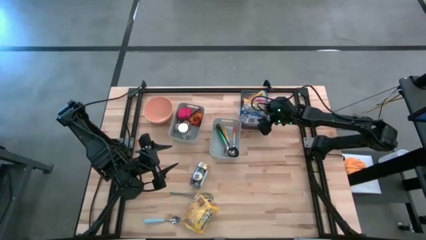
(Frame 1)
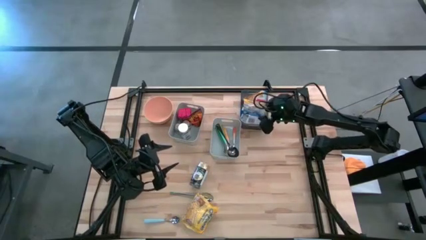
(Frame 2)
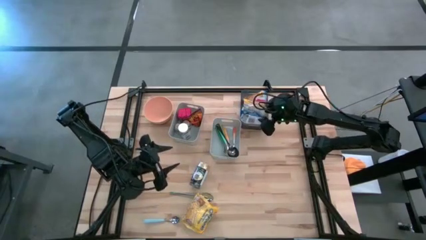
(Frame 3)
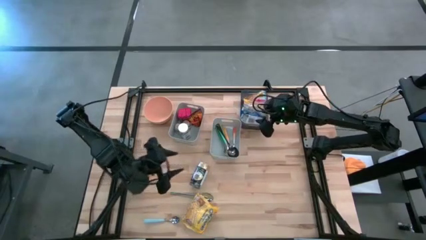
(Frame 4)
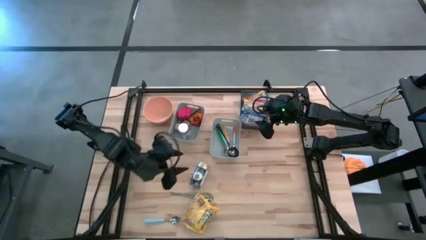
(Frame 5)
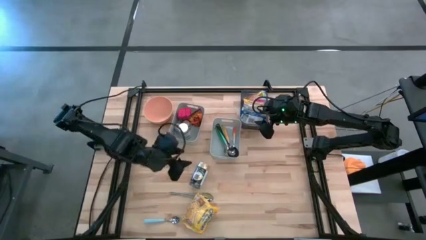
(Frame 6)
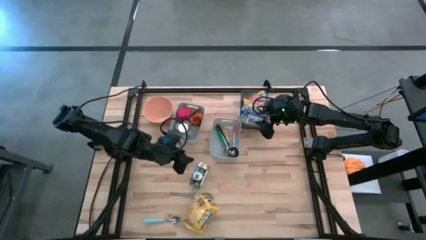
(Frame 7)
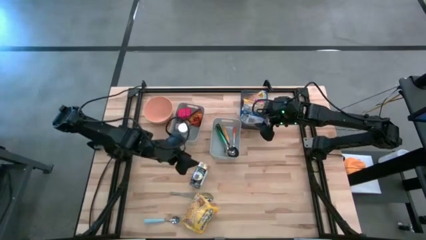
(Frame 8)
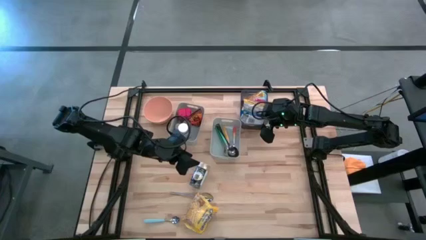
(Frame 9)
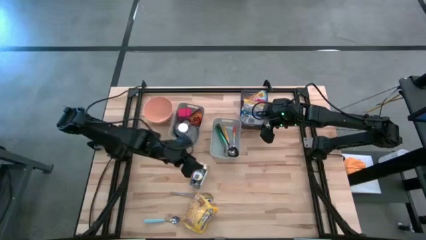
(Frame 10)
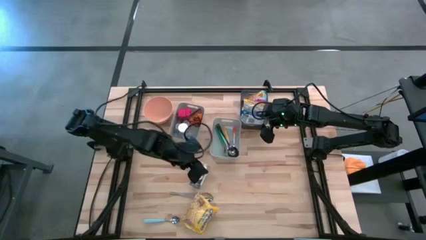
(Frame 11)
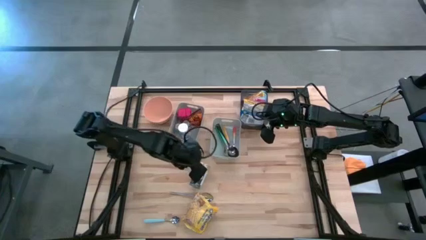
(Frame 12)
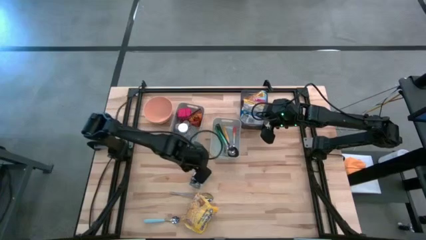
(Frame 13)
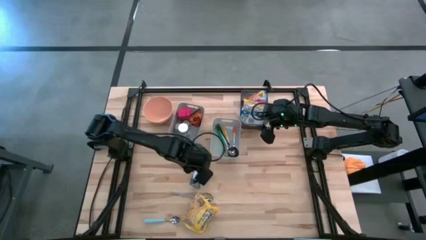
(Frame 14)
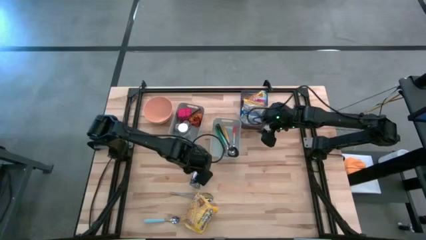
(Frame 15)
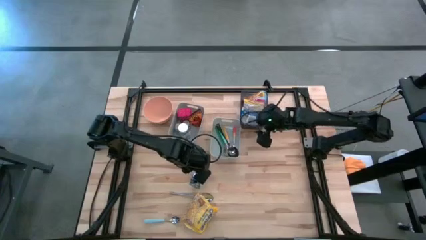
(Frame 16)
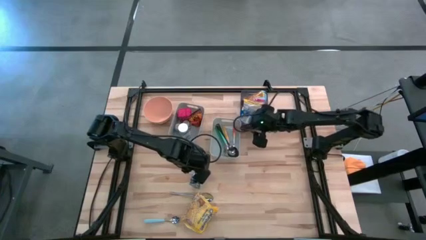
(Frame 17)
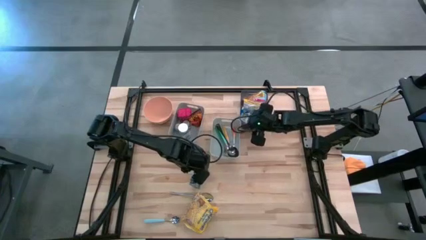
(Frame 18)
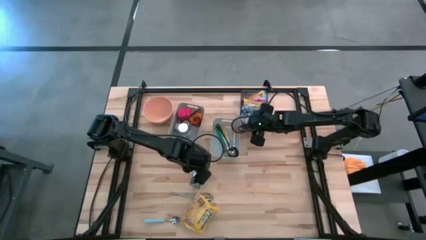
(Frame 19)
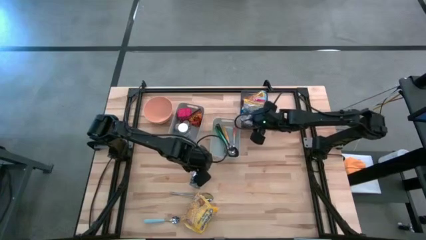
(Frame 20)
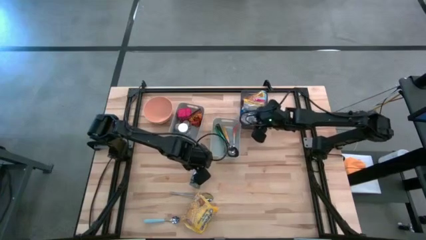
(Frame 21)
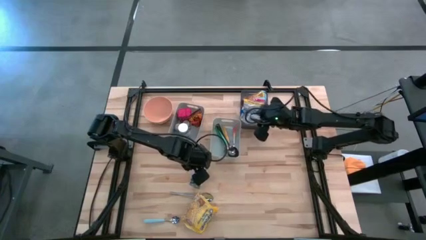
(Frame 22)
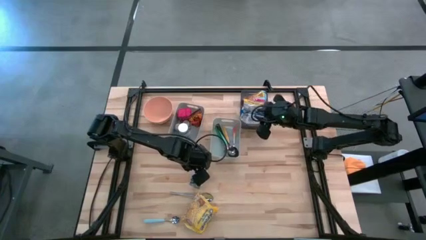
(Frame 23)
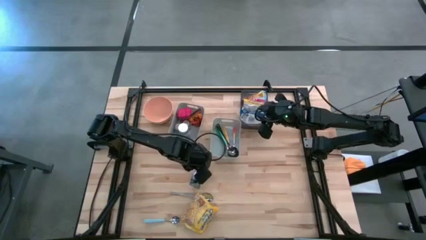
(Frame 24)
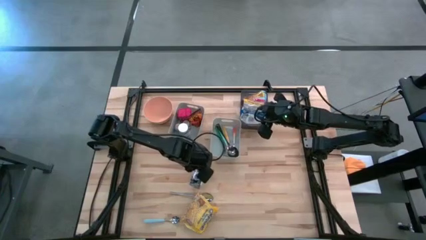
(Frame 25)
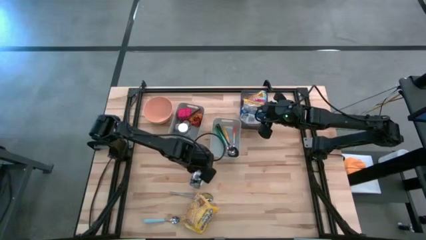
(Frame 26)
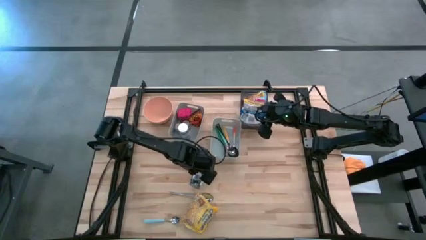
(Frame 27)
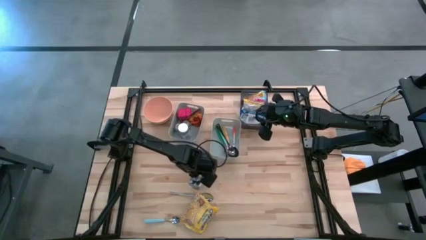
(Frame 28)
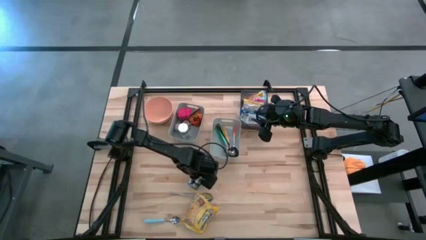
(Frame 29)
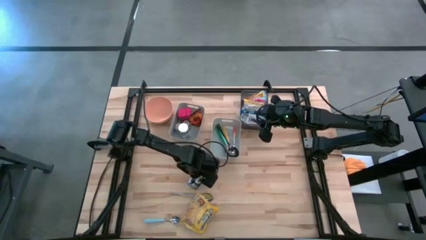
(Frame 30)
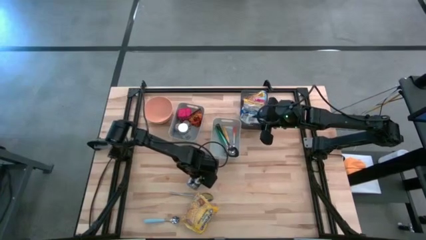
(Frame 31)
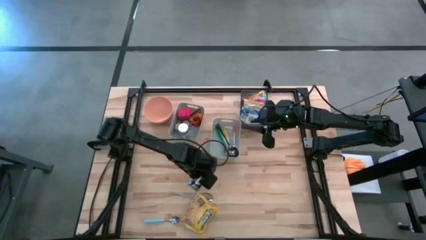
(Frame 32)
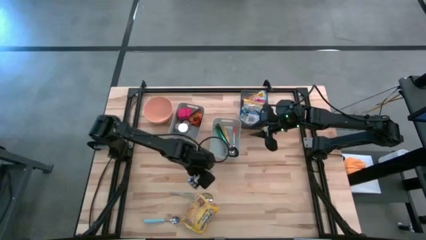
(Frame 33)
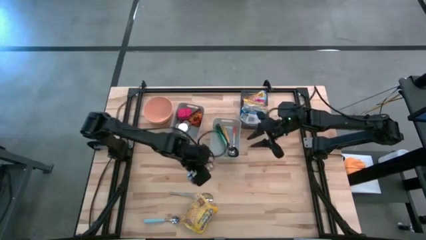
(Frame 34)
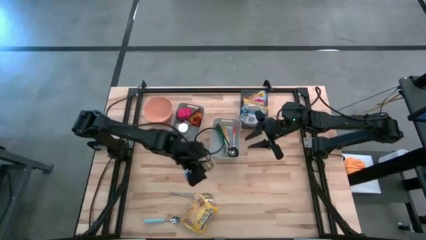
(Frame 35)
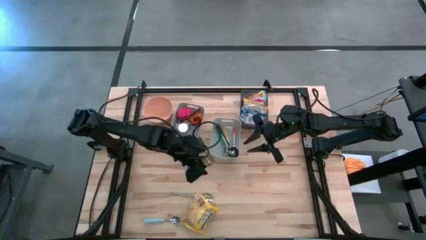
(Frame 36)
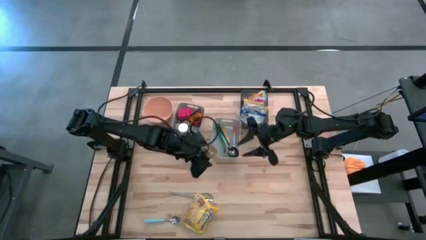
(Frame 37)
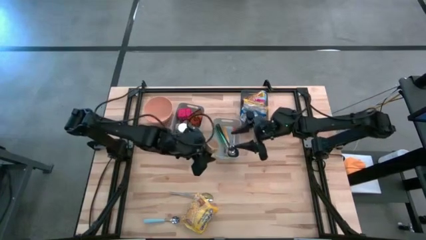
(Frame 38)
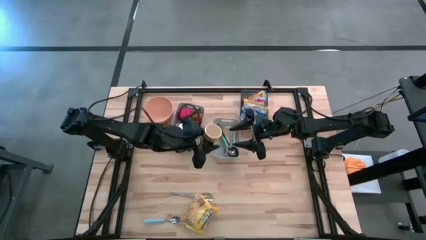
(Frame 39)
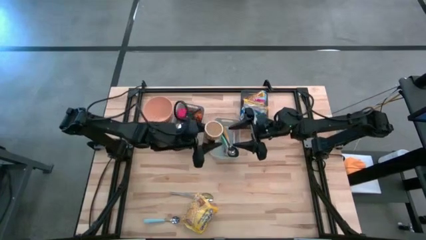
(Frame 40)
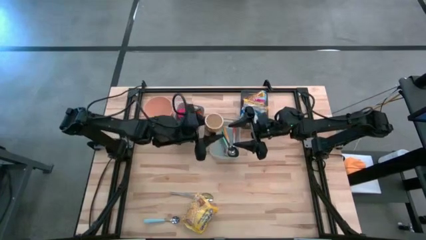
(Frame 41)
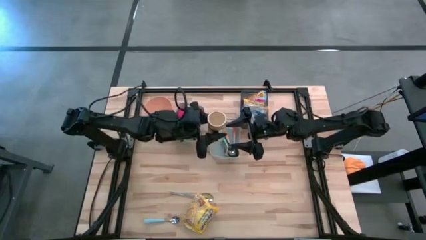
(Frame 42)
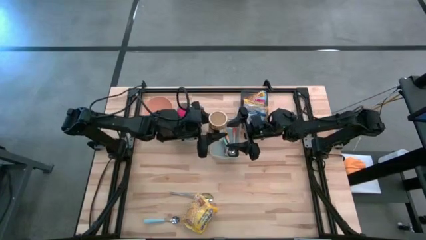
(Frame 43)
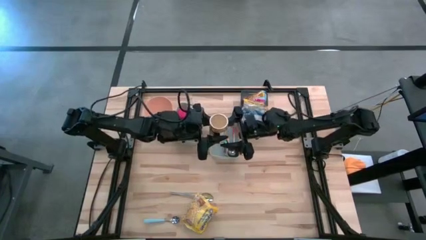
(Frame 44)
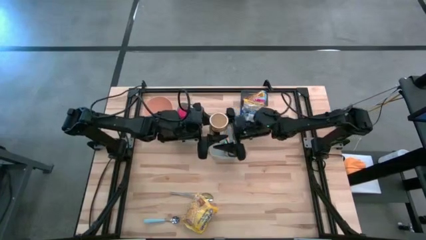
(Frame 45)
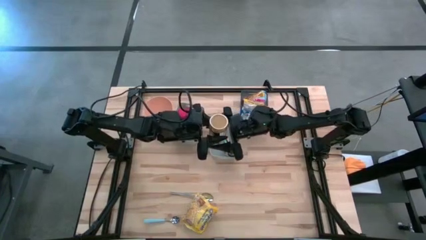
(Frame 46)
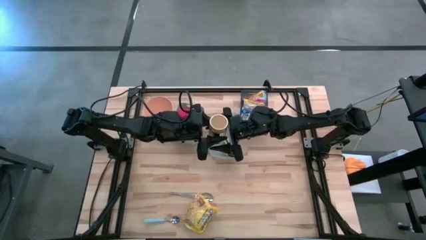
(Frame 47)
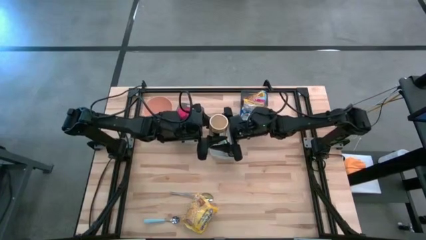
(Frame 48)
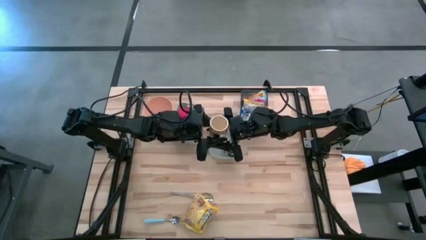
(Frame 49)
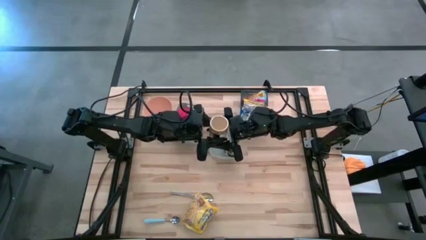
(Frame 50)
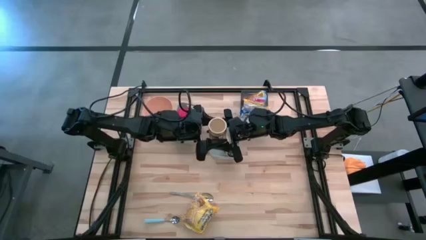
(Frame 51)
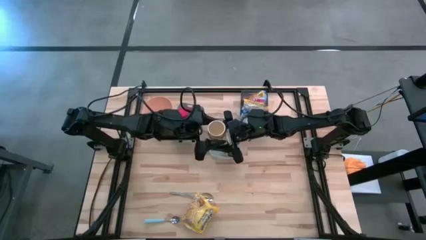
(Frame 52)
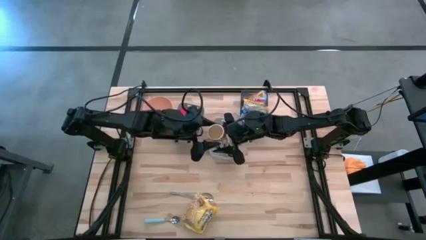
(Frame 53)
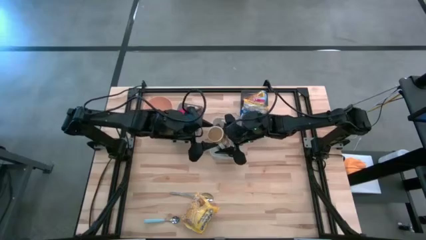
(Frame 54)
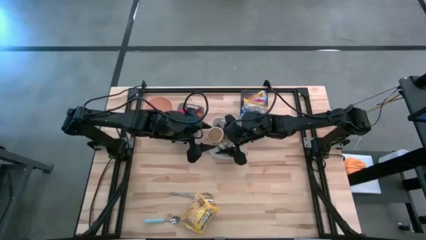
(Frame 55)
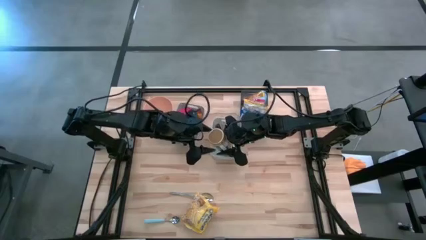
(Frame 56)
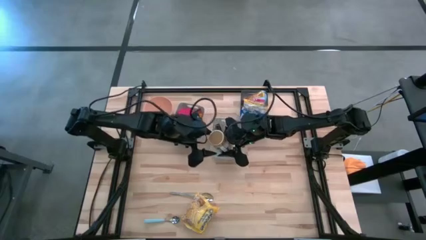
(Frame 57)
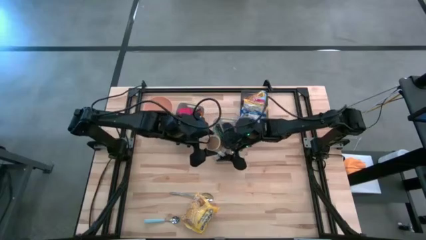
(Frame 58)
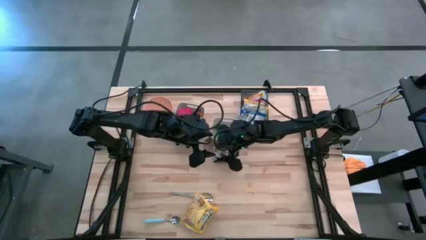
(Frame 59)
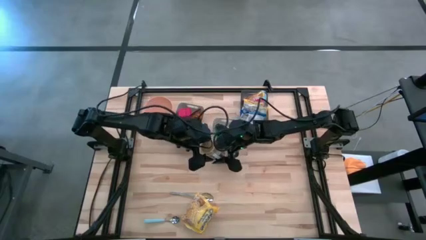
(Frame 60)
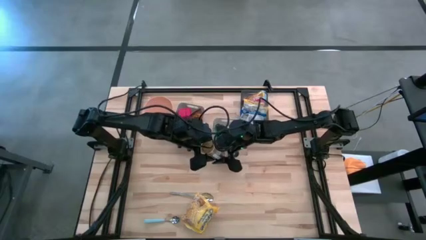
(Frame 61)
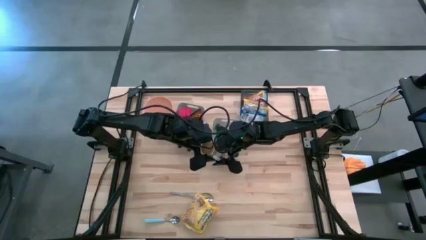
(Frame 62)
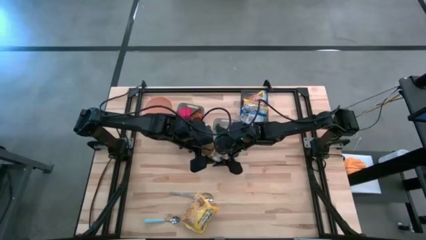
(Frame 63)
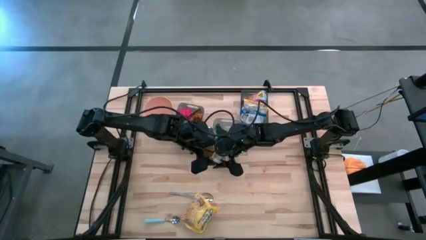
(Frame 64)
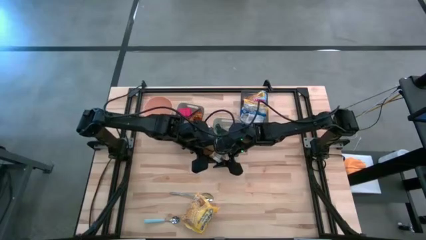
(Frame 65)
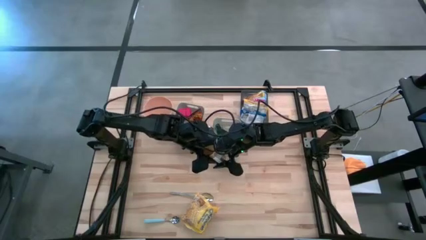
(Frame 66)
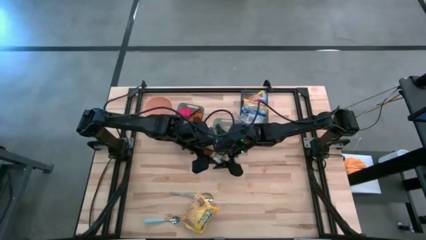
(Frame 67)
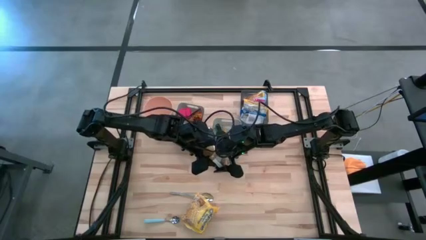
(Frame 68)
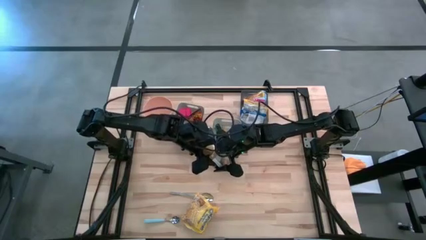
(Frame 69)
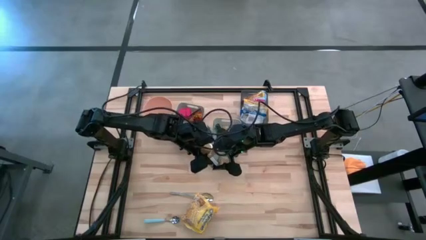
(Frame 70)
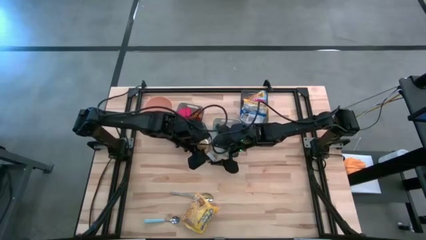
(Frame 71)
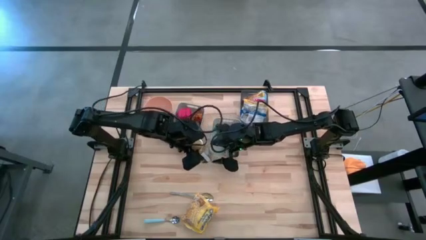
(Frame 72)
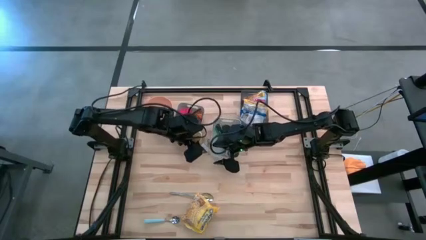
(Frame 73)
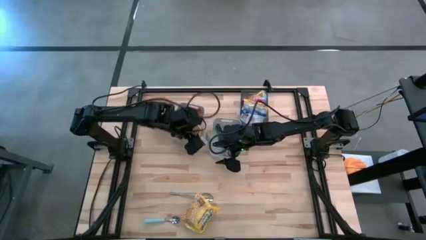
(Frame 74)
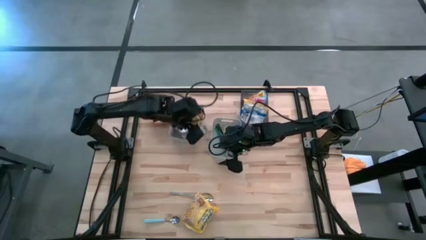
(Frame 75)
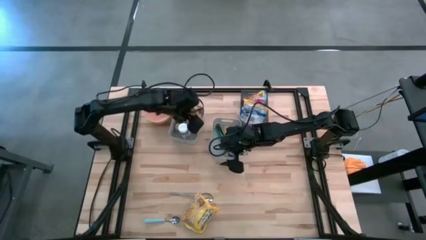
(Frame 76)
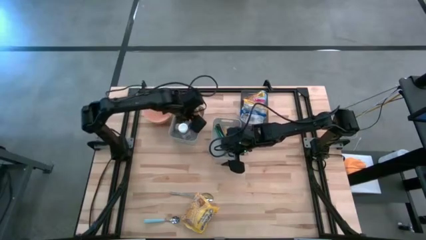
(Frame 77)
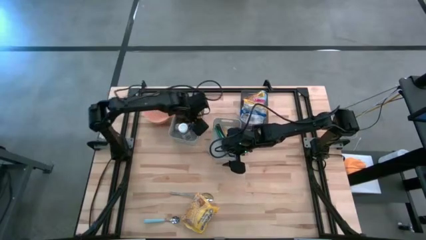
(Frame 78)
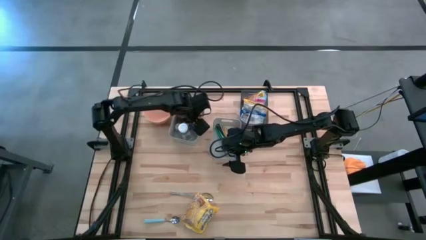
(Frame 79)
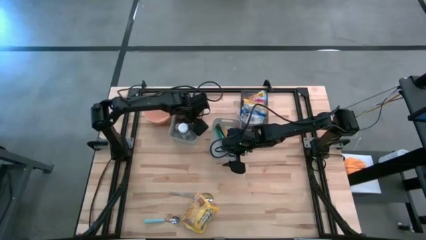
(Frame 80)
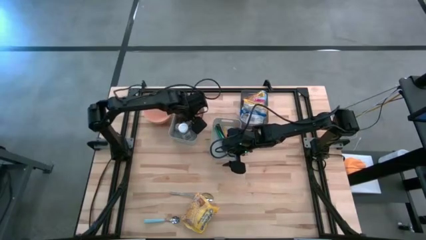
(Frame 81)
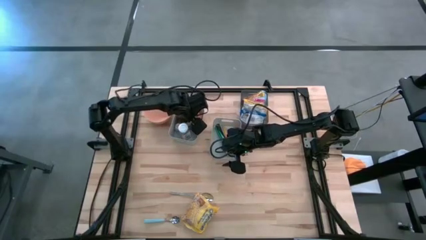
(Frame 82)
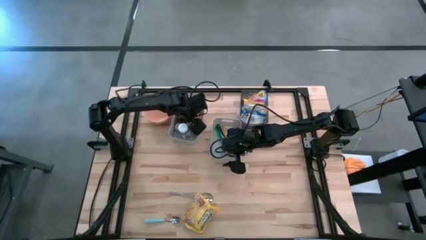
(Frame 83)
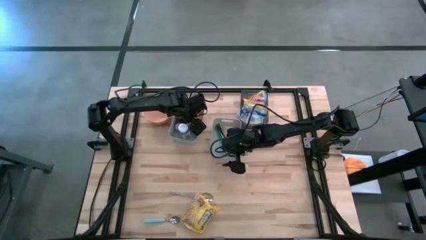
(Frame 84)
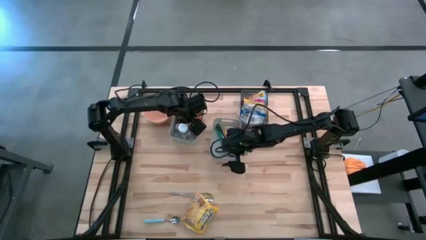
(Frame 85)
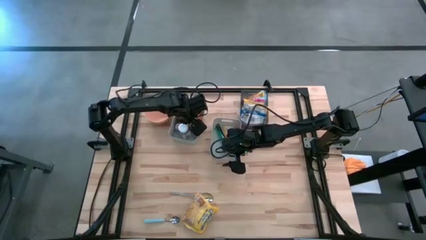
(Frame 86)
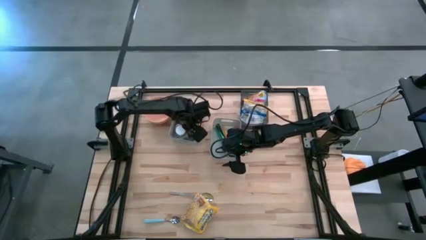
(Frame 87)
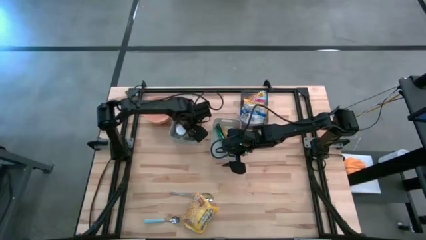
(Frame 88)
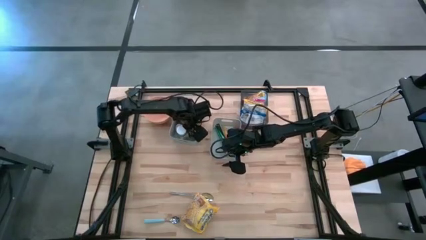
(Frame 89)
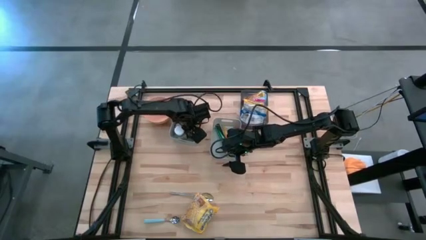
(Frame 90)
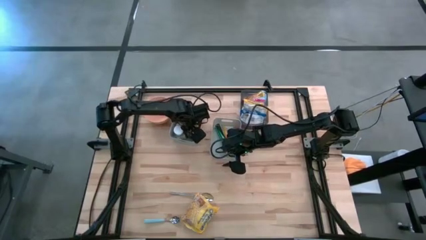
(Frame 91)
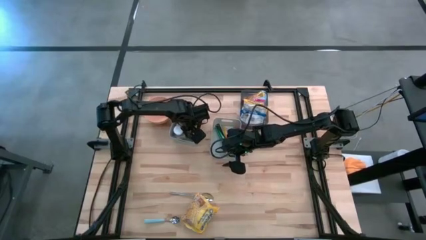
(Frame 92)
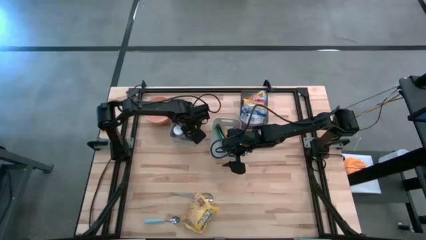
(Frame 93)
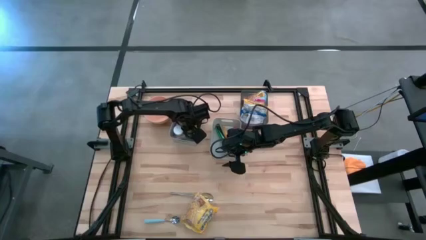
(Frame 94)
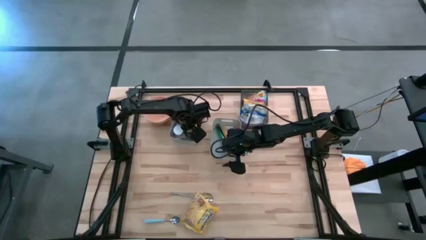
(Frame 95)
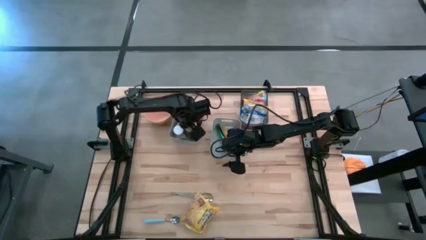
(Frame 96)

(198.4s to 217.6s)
Put the gold seasoning bottle into the left gray bin
